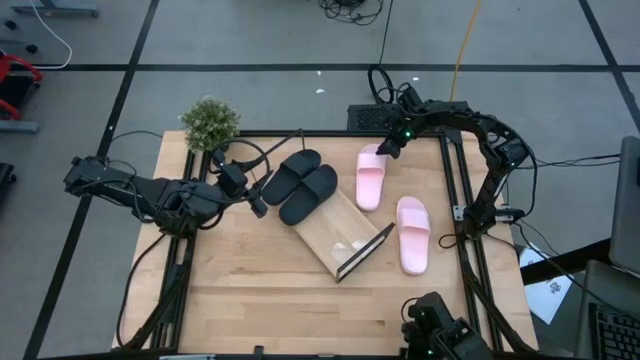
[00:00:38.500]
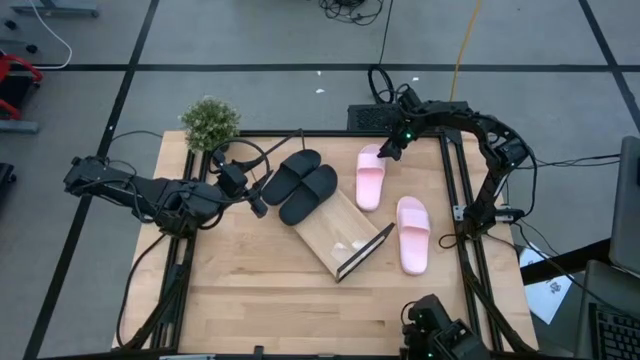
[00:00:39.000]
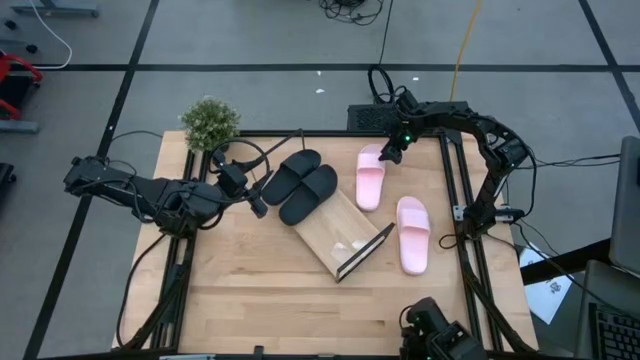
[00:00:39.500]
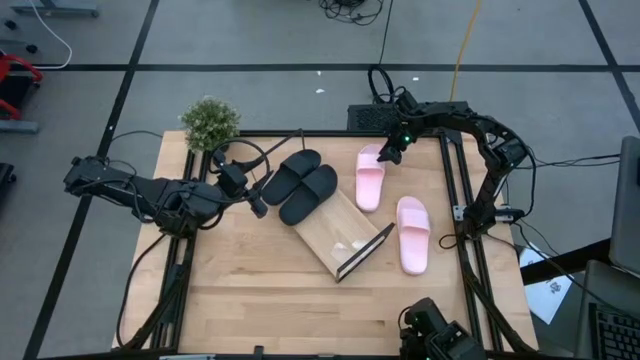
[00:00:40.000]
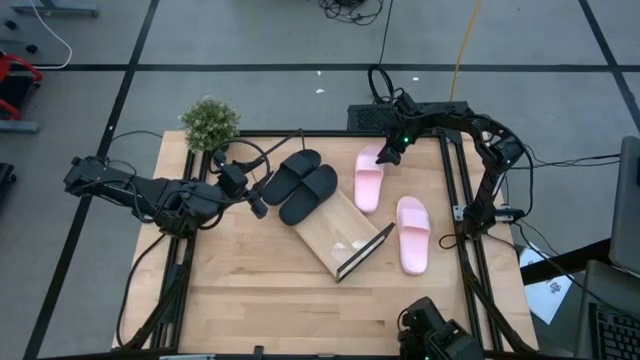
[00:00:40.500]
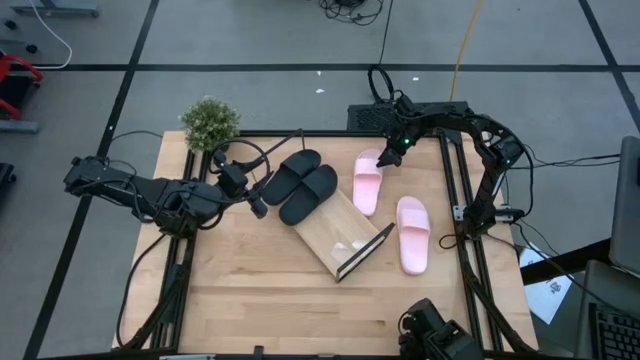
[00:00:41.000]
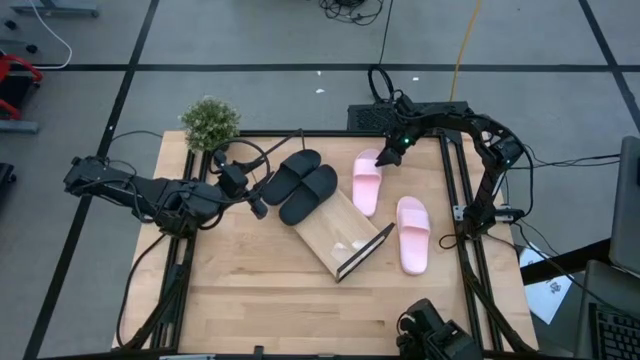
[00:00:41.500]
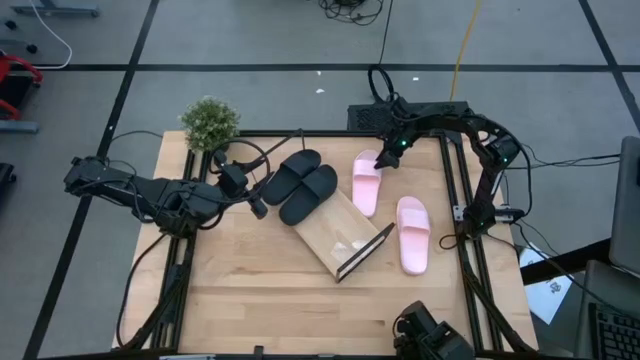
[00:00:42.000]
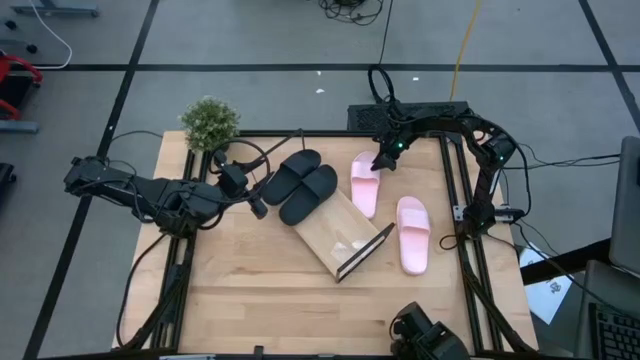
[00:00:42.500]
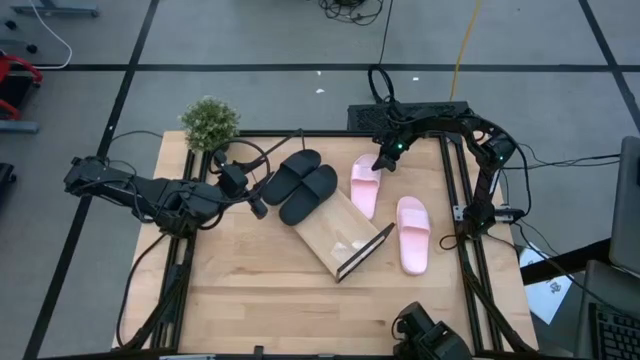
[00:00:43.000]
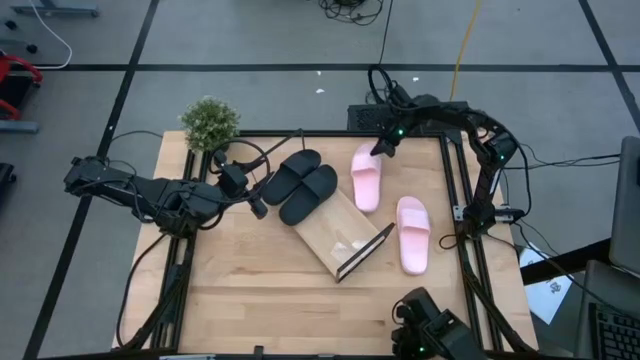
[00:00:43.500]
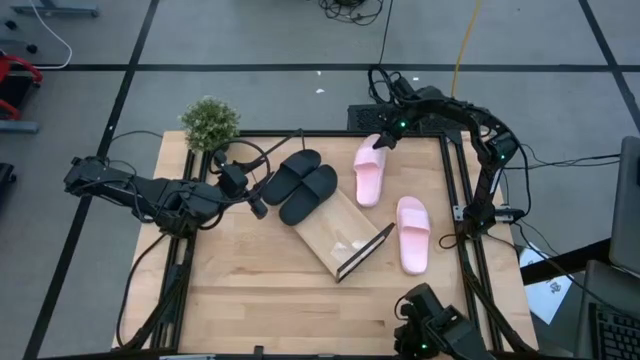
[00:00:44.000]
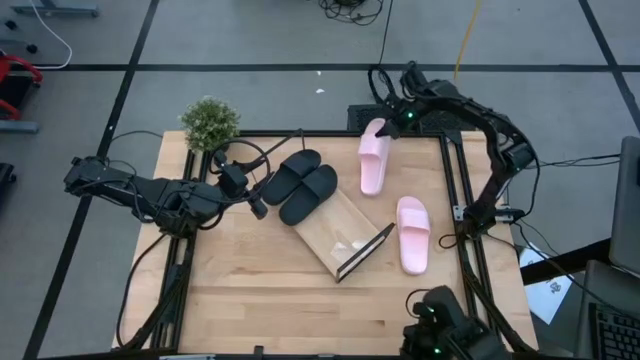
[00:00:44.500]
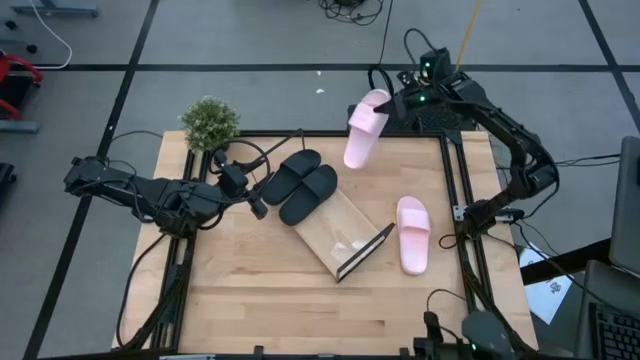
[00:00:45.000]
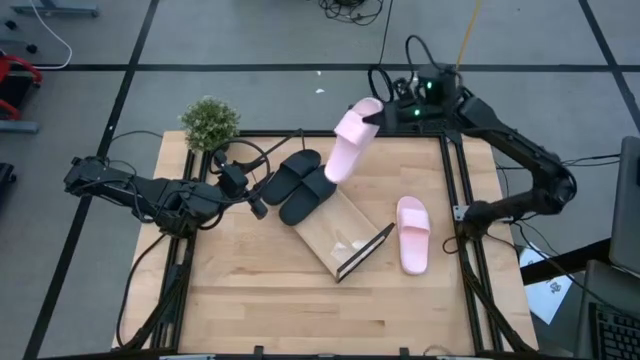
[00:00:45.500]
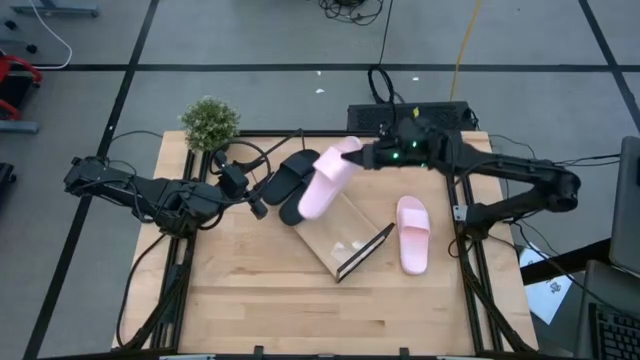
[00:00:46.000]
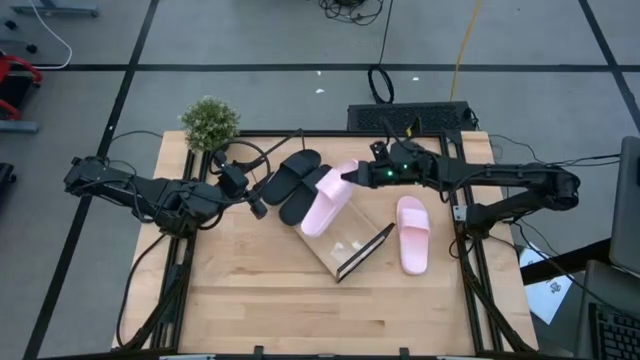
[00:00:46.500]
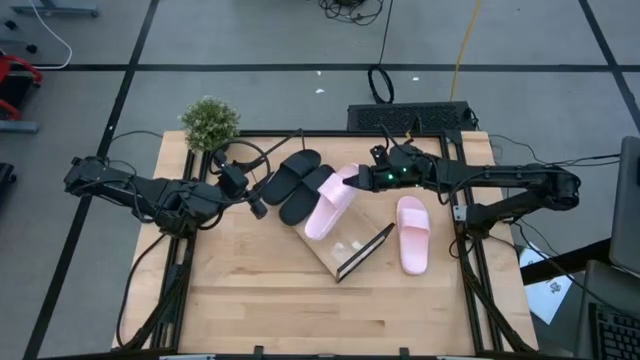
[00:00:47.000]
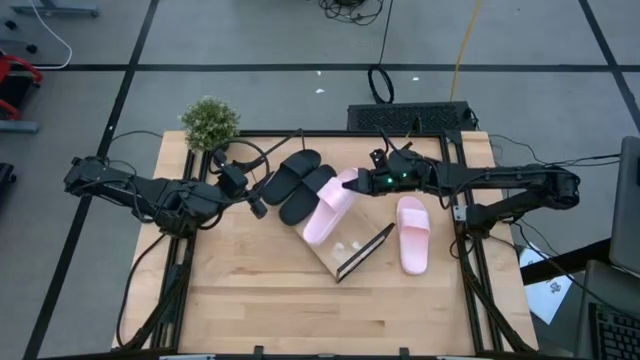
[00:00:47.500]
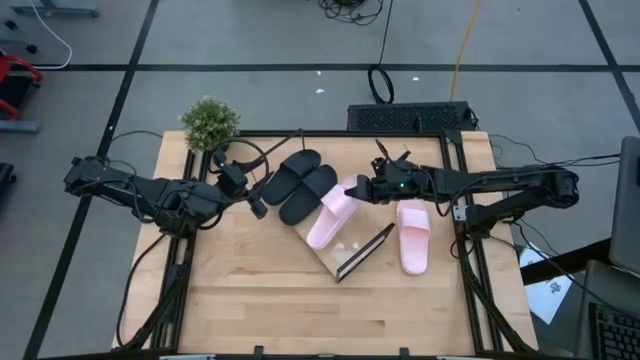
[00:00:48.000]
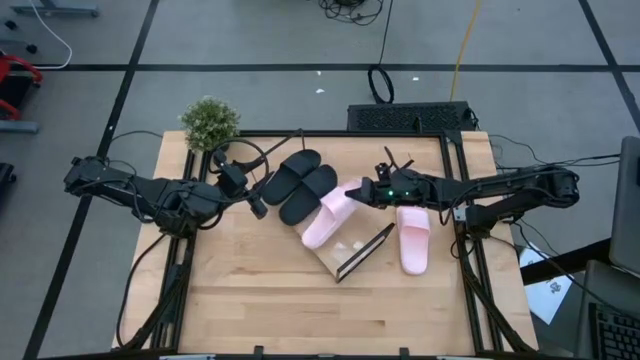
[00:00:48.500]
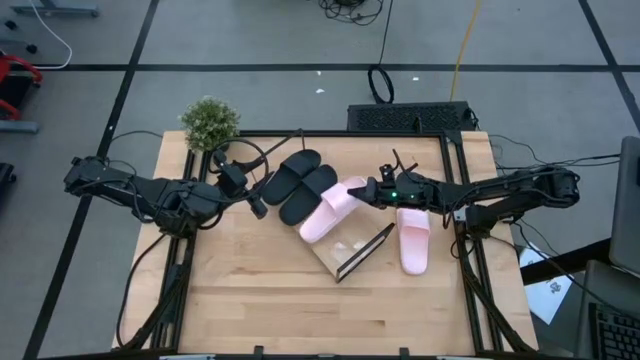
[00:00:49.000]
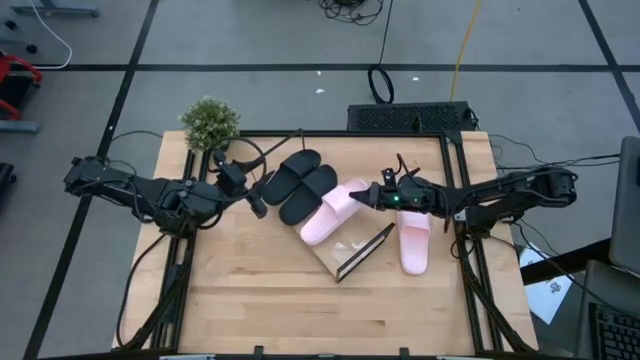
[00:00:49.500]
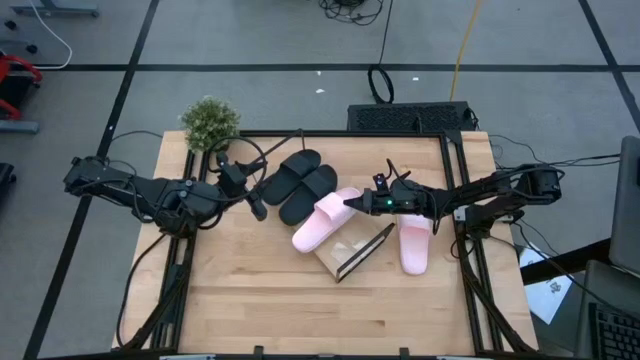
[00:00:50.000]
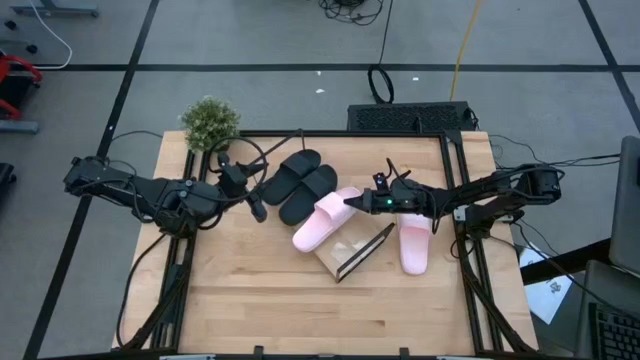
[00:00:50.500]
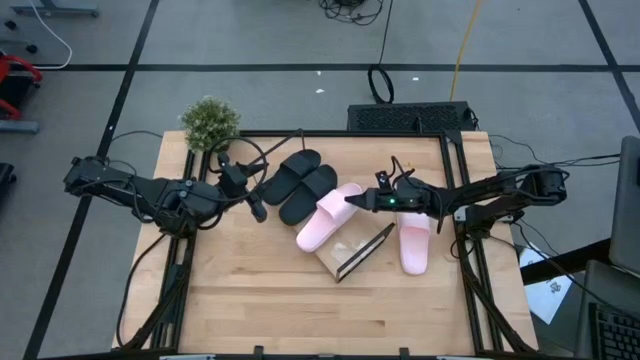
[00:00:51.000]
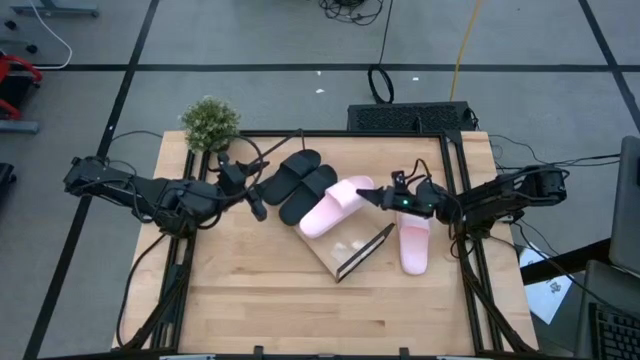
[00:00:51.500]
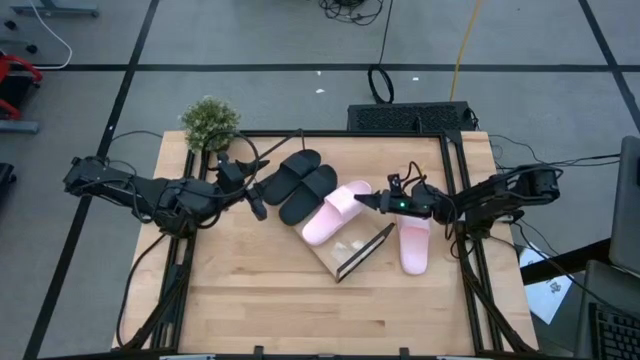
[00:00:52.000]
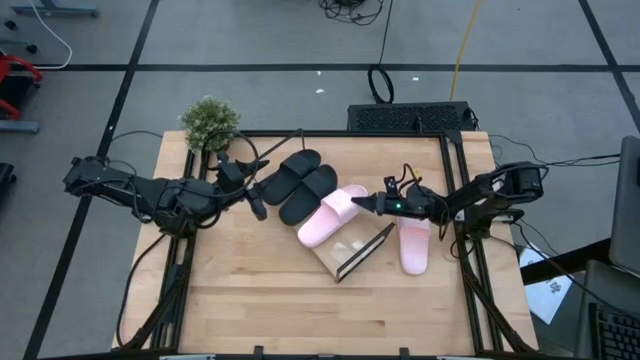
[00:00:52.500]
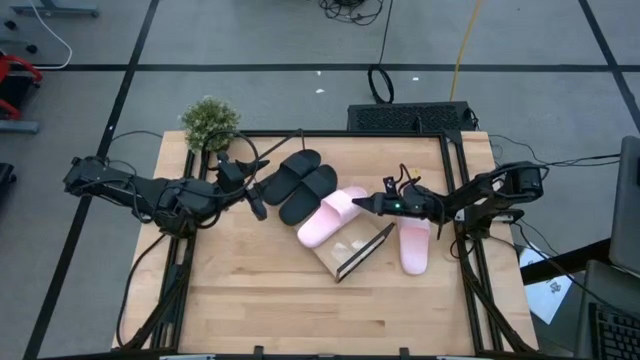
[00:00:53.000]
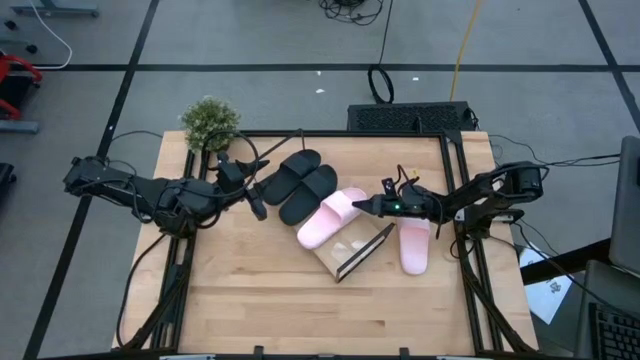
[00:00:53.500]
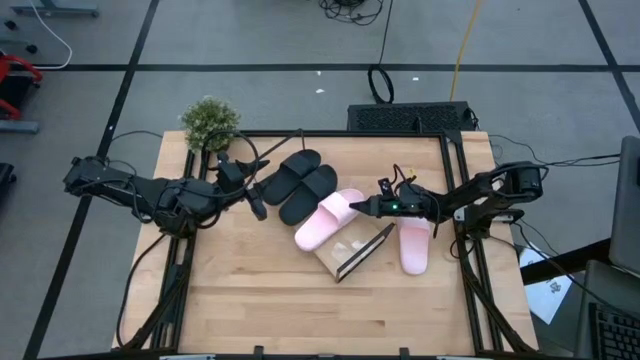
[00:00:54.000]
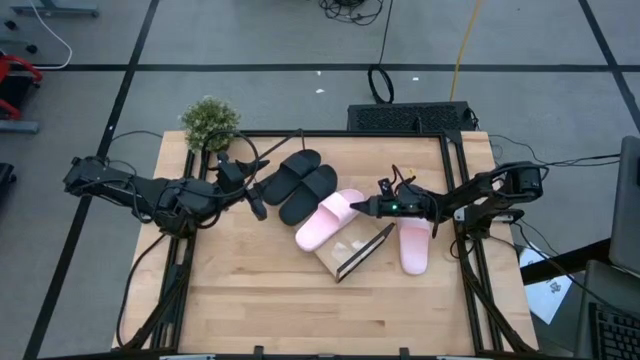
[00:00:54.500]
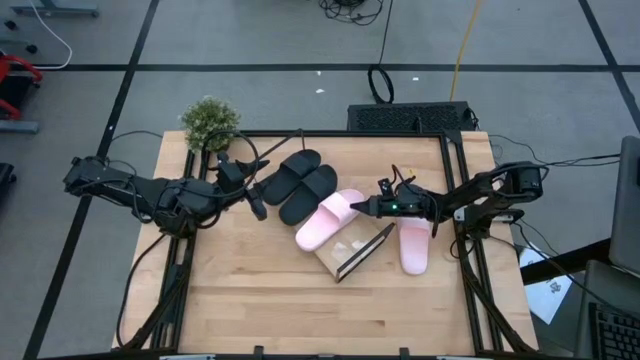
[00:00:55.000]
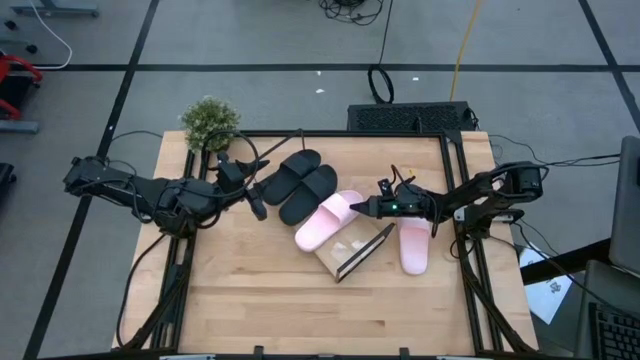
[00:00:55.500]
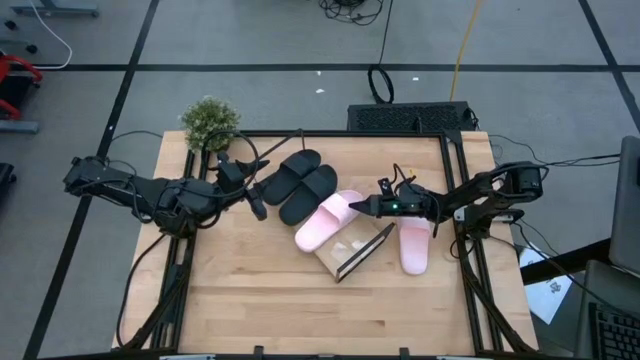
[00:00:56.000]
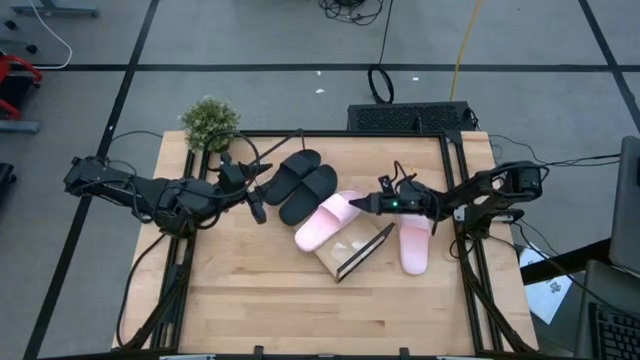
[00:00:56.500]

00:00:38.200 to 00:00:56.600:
Task: Pick and place slides into the shelf
Put the left pink slipper on the shelf
